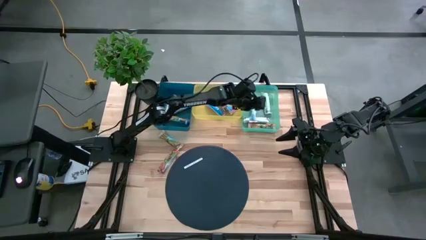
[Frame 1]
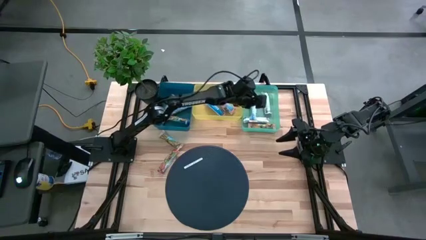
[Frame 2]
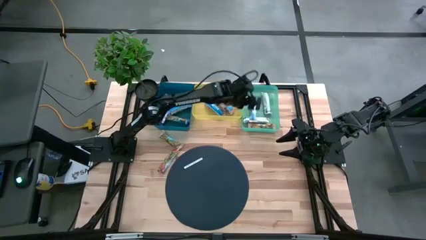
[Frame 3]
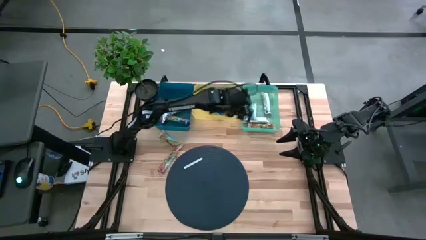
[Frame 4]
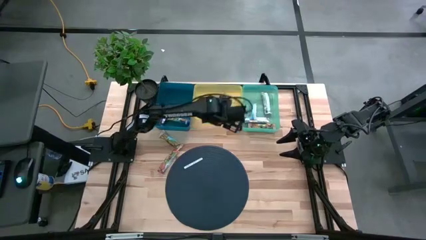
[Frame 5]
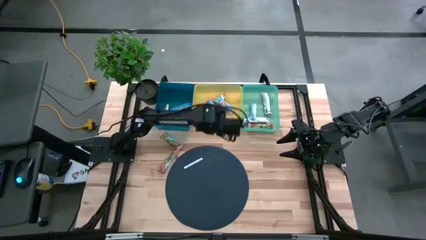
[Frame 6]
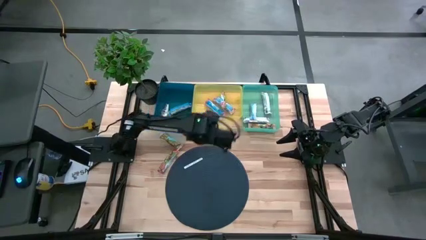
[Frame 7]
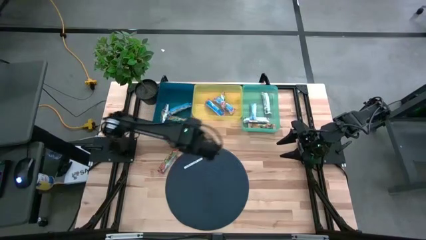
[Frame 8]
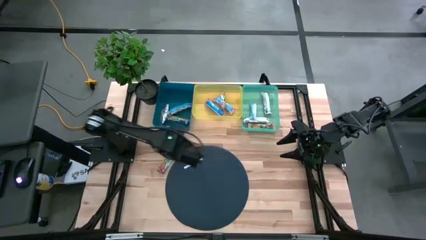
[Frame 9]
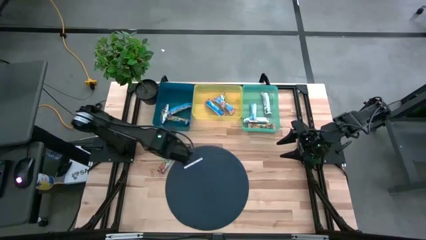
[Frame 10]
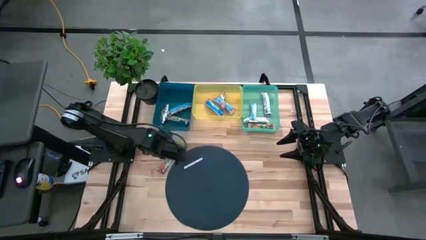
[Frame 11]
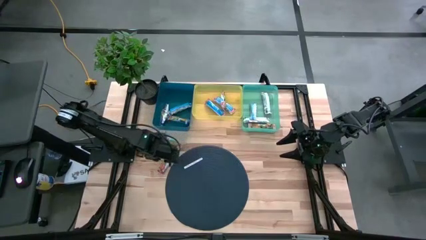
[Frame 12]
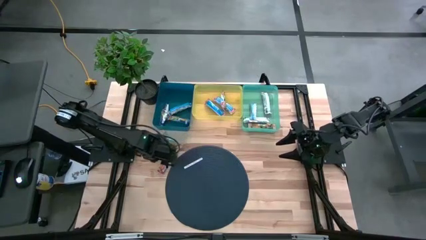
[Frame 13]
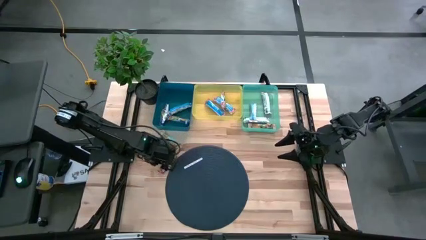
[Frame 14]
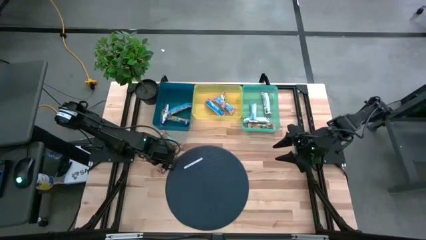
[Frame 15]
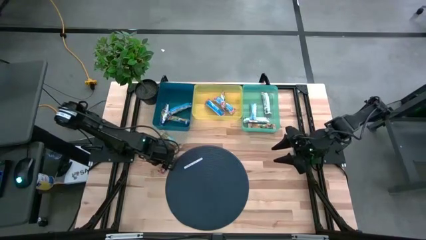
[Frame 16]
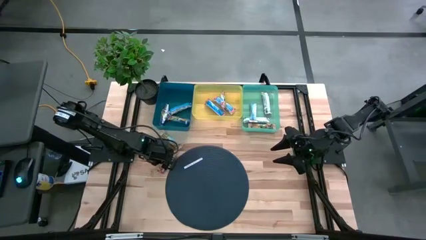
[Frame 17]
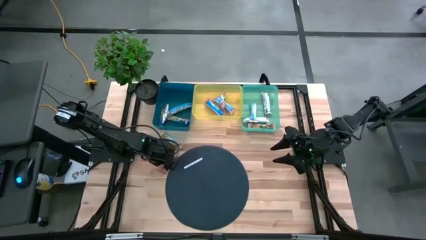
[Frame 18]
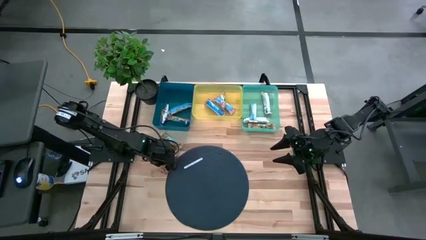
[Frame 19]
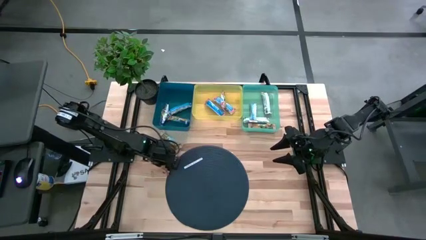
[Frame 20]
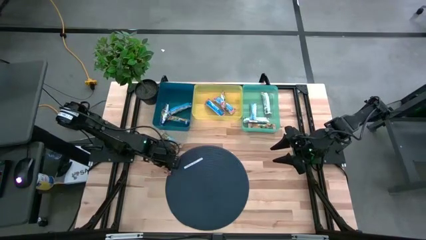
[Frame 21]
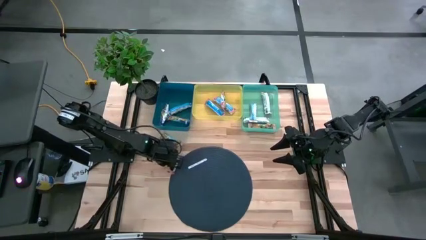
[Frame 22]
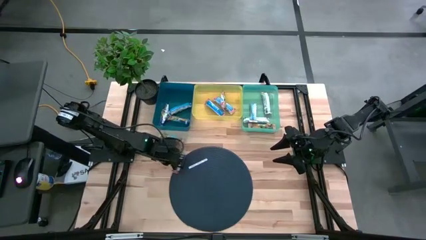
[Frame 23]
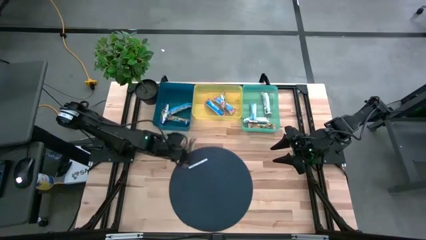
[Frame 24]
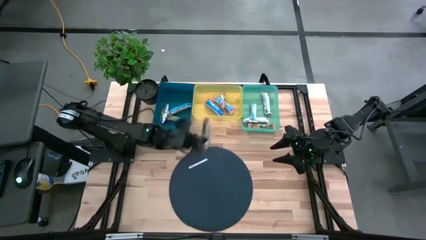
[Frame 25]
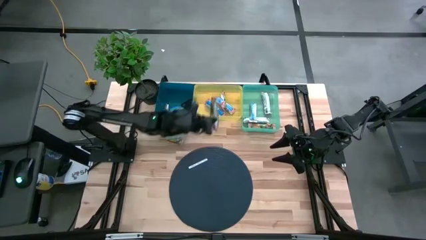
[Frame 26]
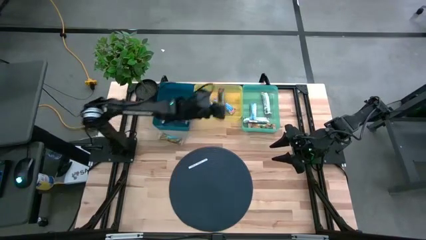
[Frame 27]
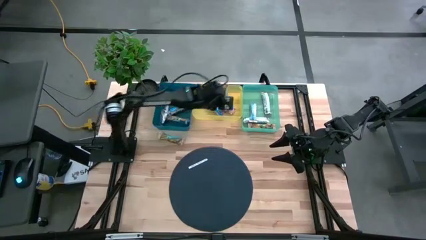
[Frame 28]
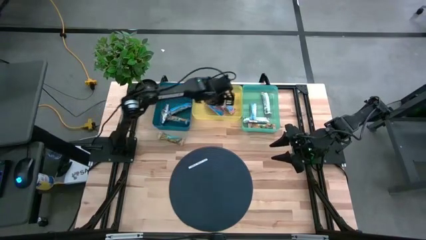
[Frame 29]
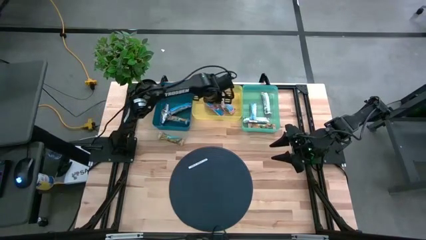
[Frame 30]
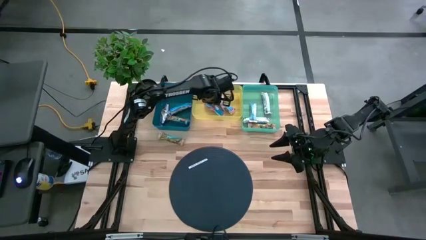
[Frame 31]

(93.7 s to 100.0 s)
Task: Pick and place Granola Bars by type
Put the red granola bar into the yellow bin

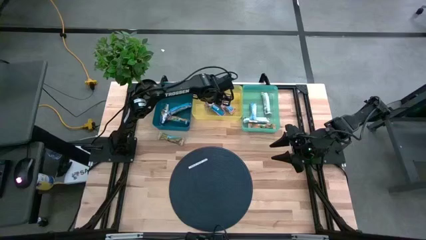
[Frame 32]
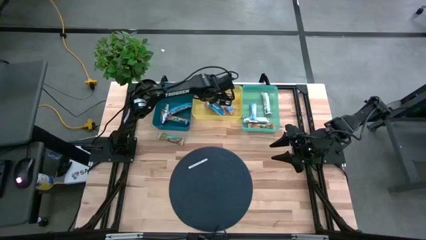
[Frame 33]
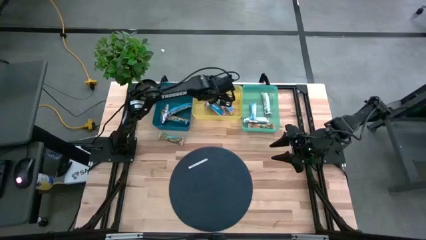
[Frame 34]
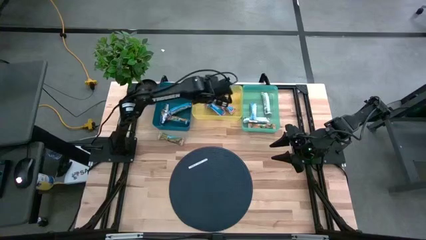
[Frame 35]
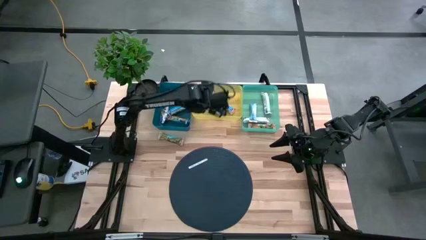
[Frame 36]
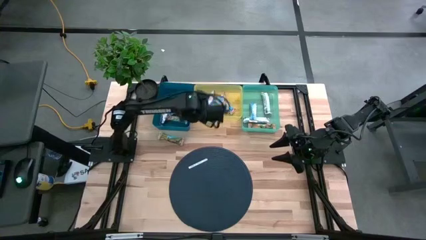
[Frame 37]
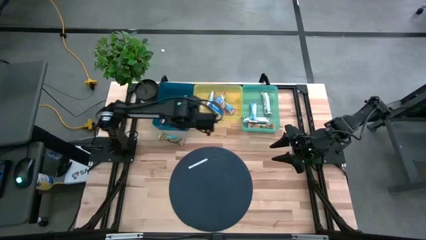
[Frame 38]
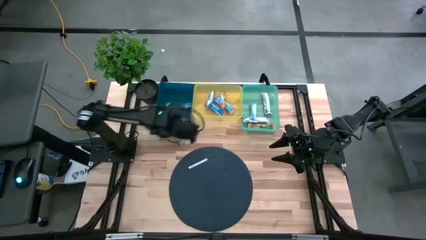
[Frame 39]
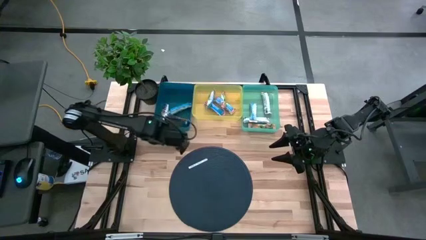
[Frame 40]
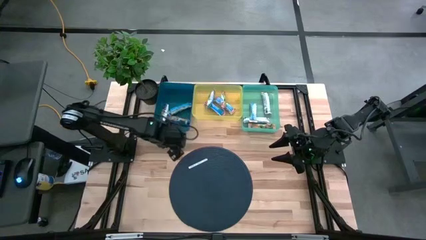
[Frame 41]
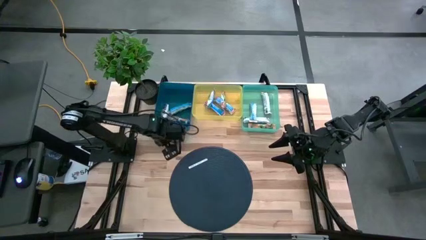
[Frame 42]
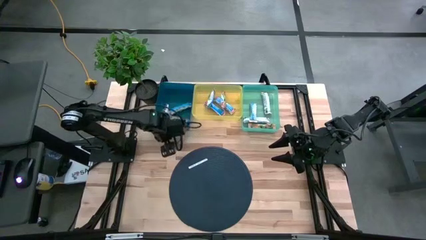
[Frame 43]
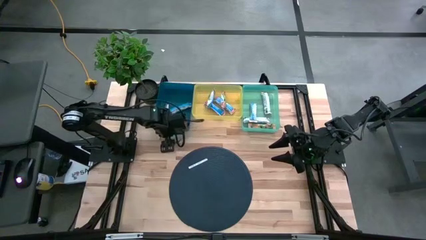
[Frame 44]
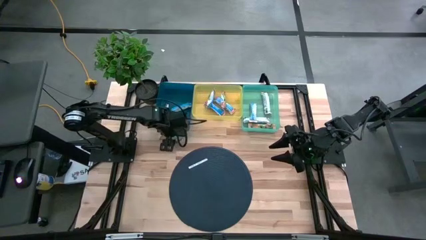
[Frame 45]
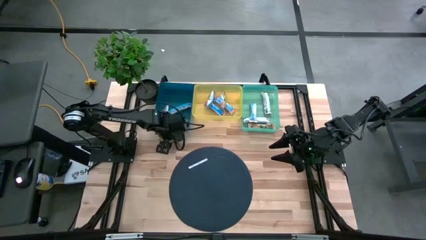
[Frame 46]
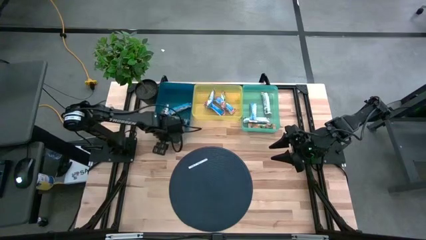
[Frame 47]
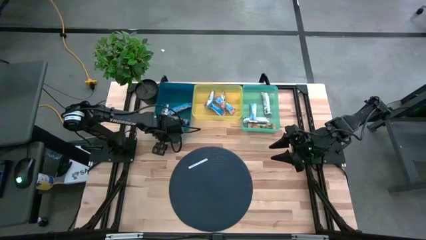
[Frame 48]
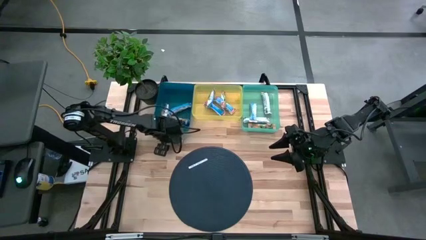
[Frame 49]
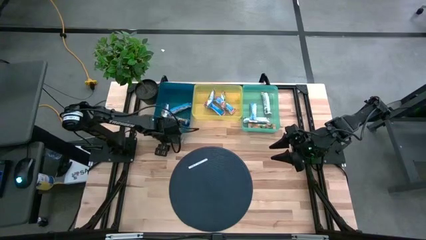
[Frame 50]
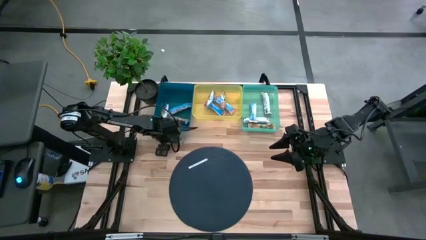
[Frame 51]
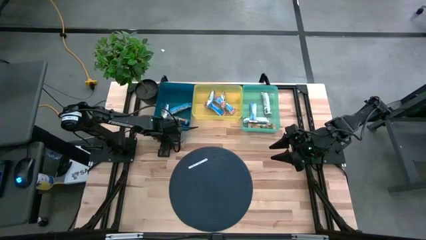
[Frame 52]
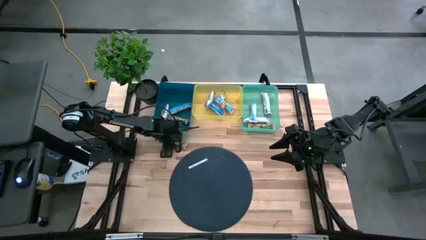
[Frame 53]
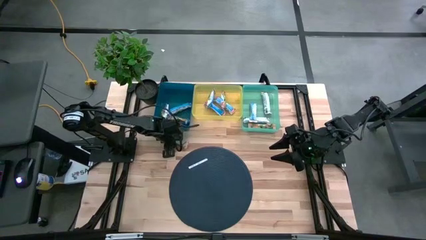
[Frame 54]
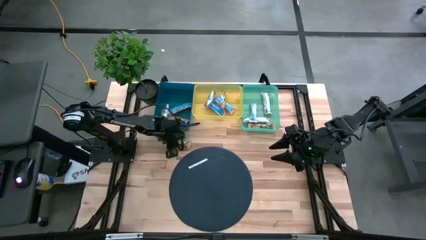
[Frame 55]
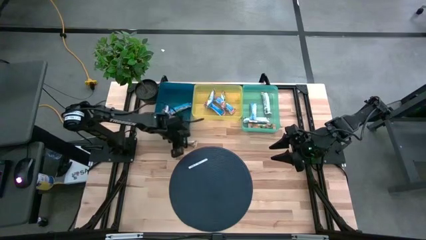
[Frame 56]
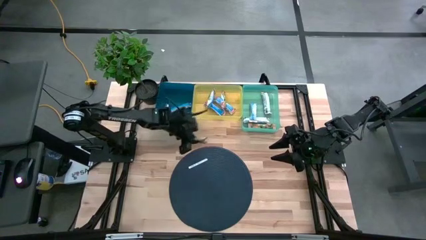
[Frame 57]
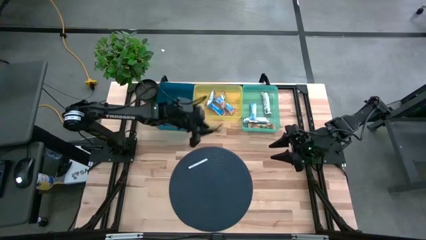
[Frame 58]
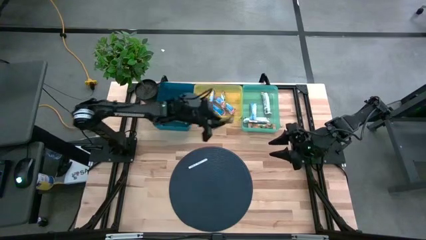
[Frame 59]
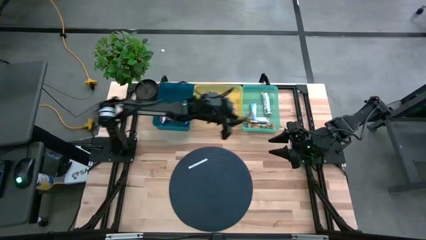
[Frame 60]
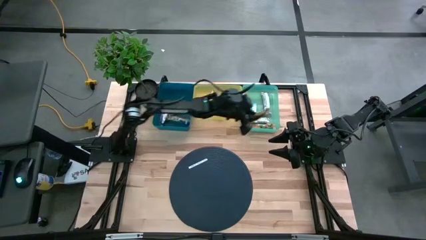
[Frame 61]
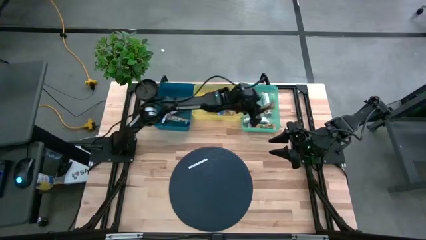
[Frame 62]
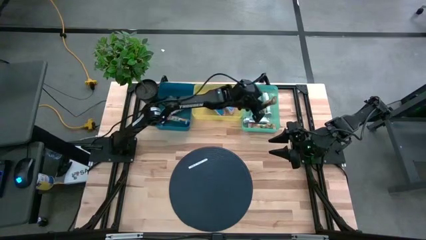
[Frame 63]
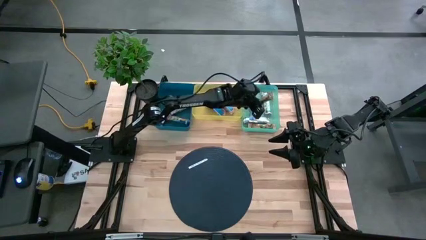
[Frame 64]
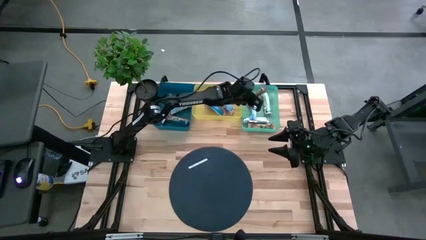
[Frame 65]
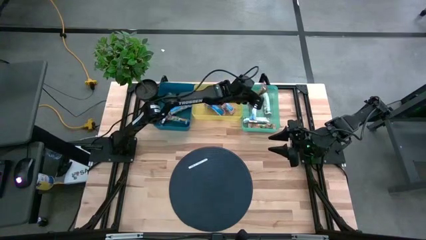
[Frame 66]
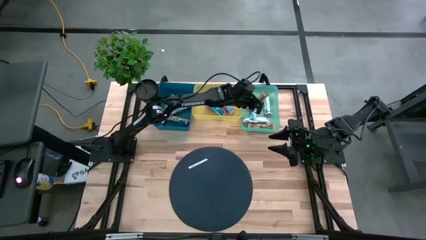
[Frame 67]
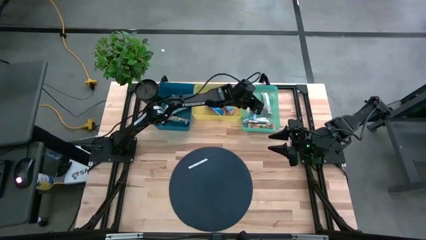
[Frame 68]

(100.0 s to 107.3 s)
Put the yellow granola bar into the green bin

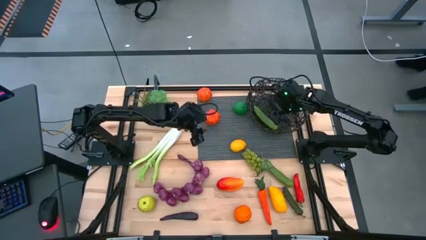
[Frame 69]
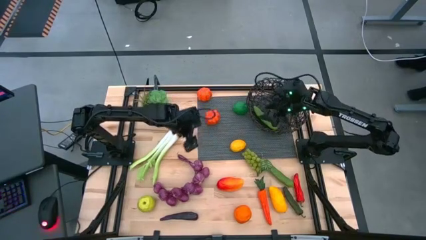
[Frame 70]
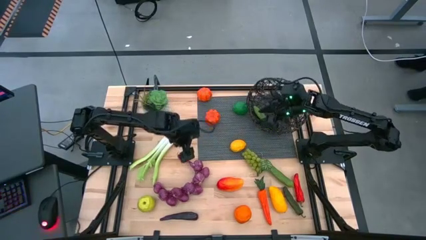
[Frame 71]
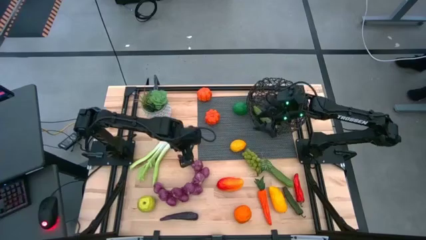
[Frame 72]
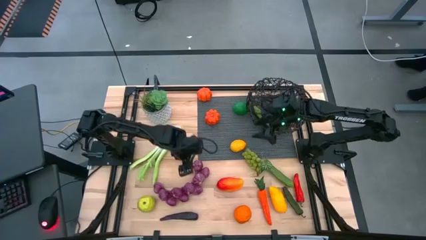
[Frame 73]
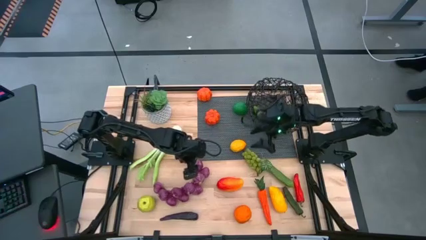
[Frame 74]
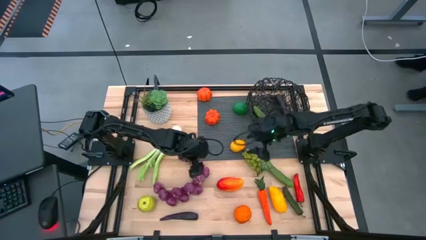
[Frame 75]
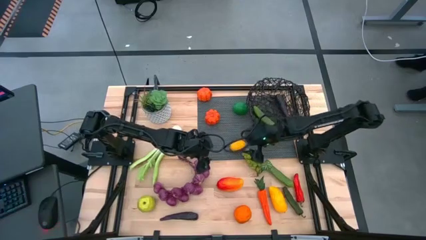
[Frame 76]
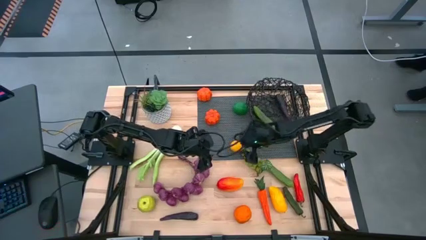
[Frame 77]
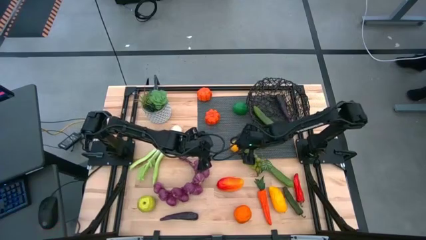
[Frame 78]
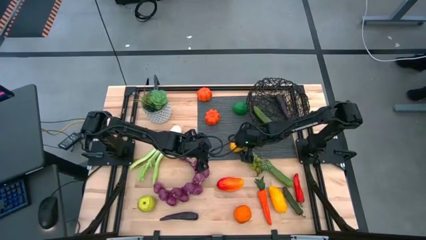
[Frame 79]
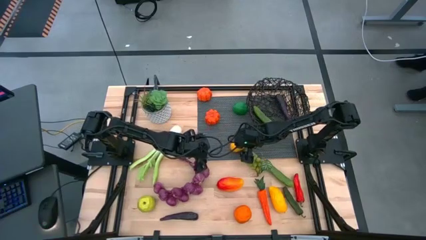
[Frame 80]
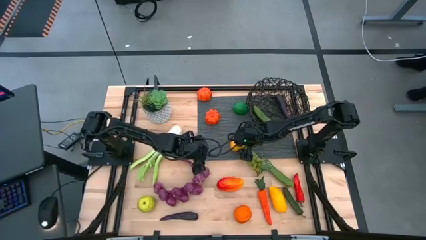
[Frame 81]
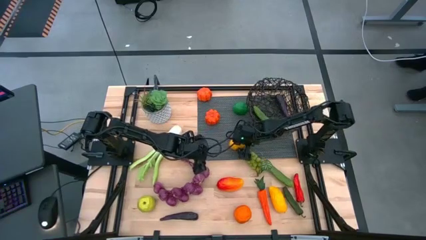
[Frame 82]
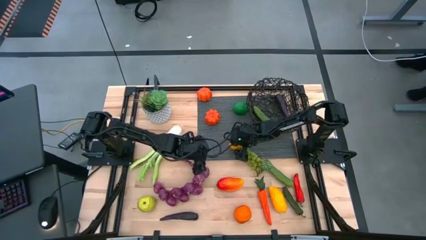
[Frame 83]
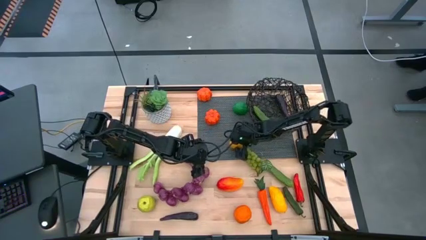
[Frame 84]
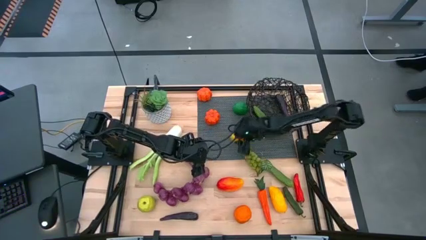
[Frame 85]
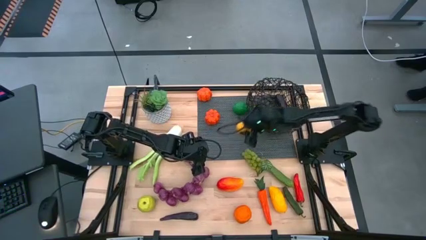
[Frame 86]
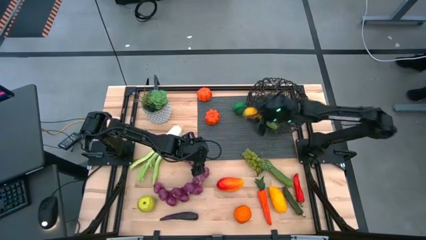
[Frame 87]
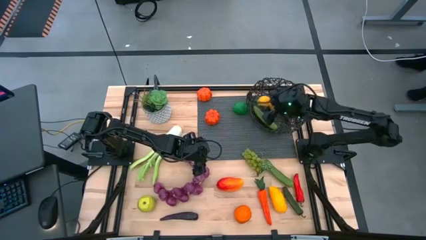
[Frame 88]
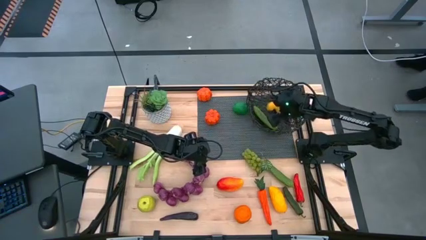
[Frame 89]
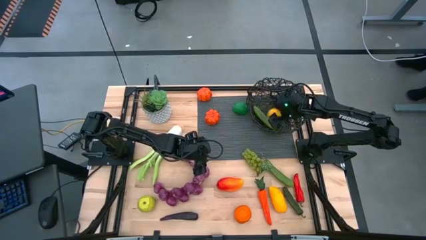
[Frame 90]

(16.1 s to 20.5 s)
Task: Build produce basket
Put the yellow lemon into the black basket
